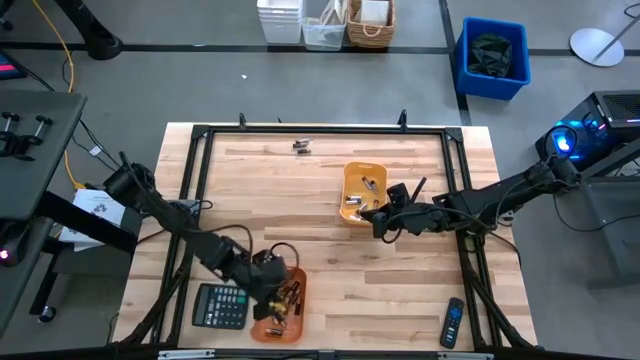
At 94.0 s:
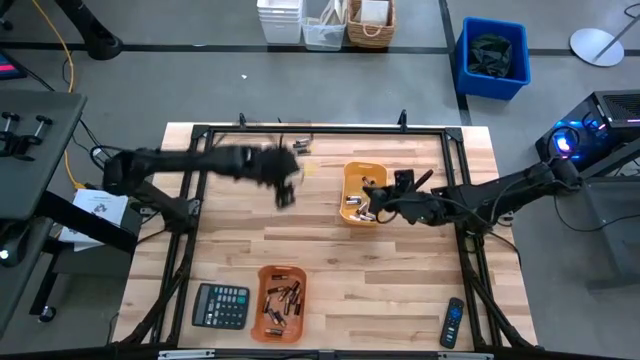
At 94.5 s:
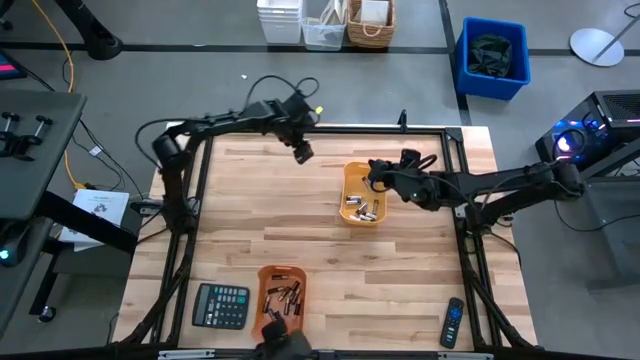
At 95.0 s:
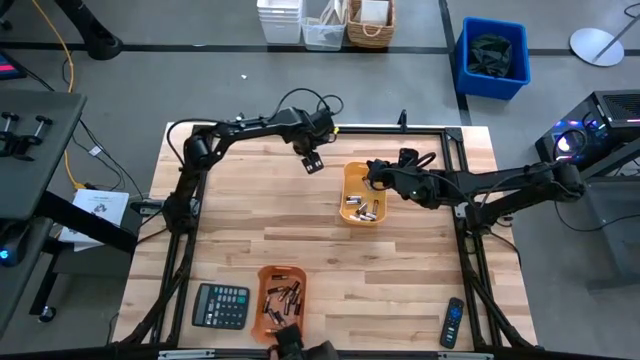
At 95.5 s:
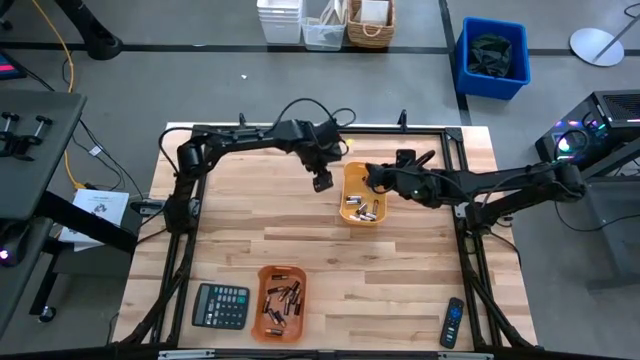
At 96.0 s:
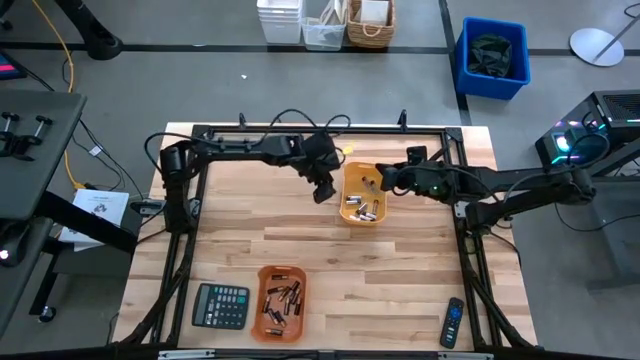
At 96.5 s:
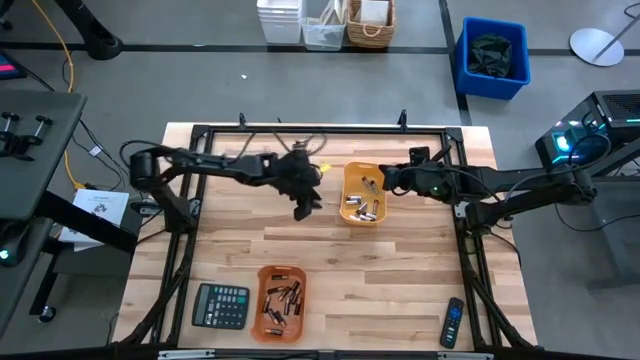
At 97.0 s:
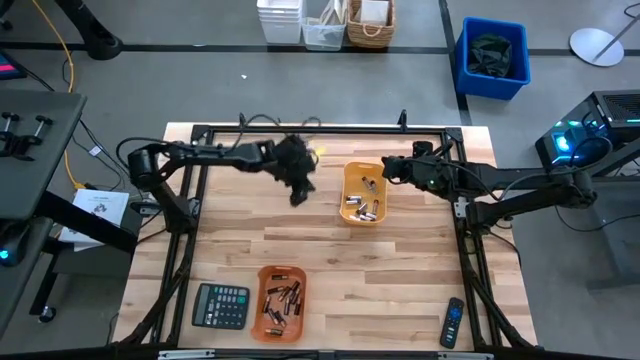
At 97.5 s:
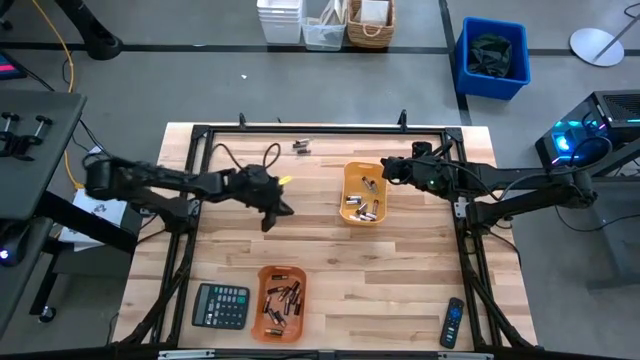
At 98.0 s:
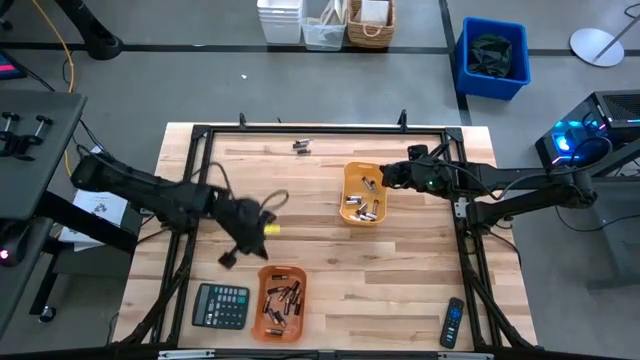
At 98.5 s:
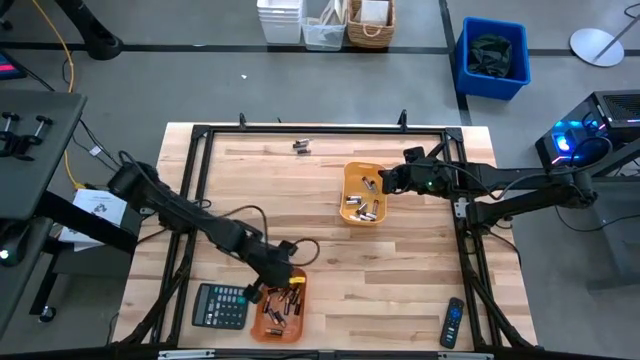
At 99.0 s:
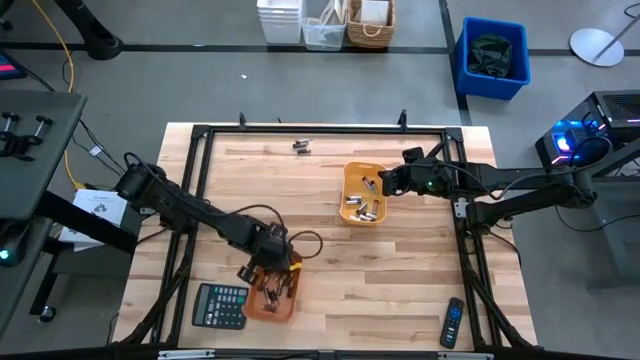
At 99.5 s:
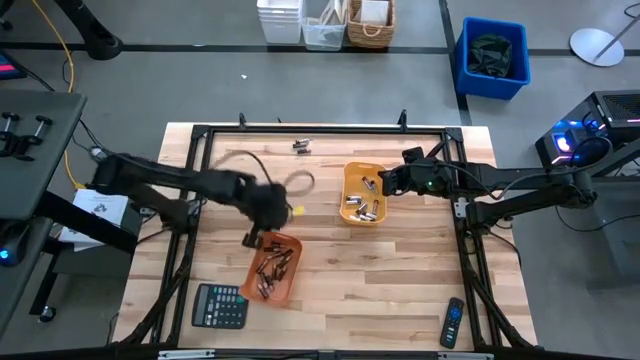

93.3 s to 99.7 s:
Task: Sort batteries
Adjust the orange bin

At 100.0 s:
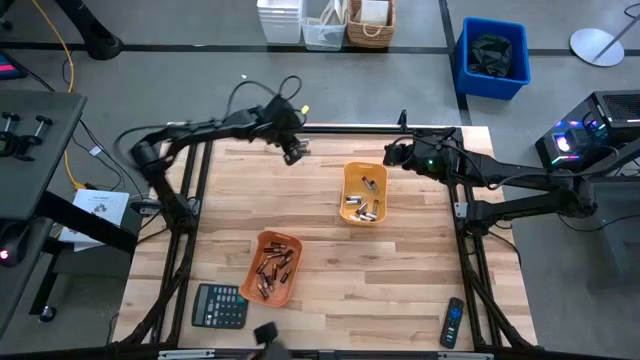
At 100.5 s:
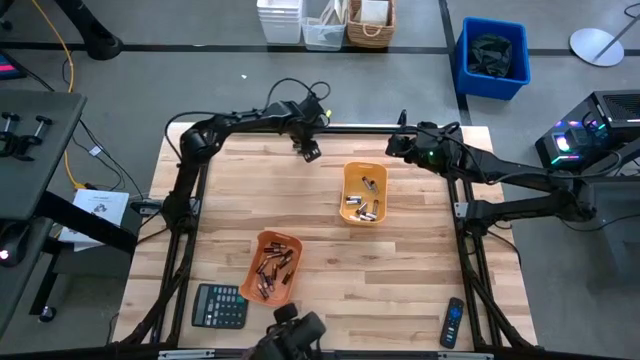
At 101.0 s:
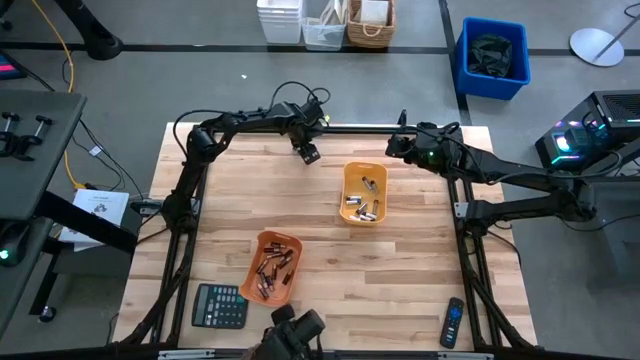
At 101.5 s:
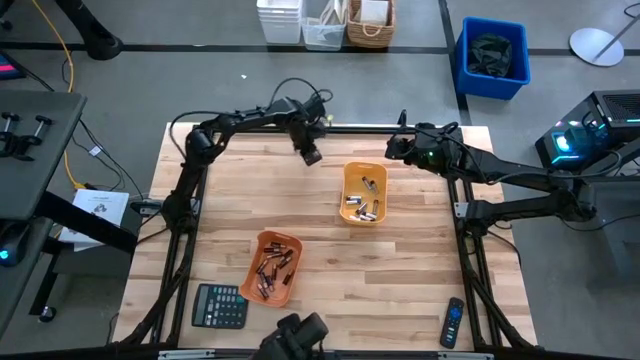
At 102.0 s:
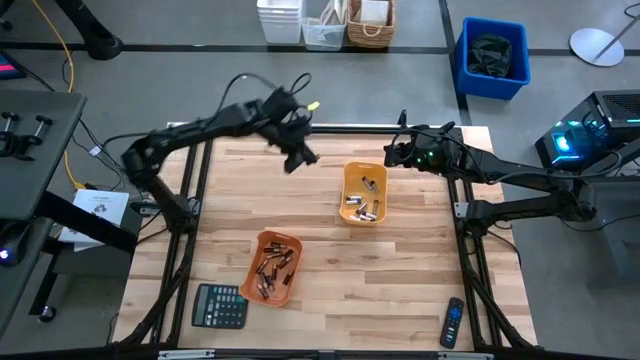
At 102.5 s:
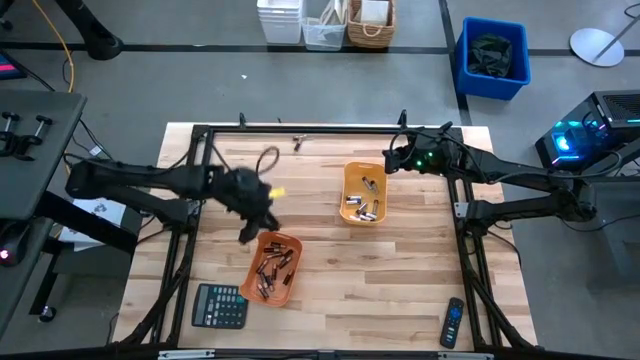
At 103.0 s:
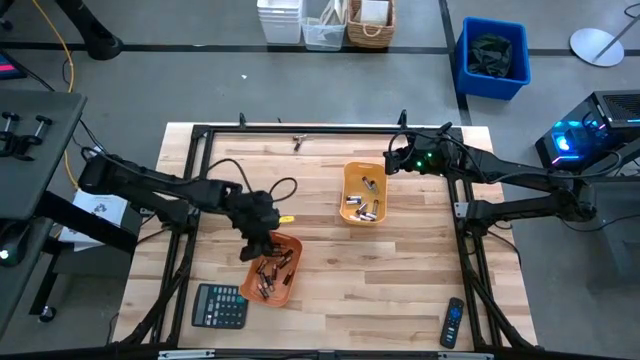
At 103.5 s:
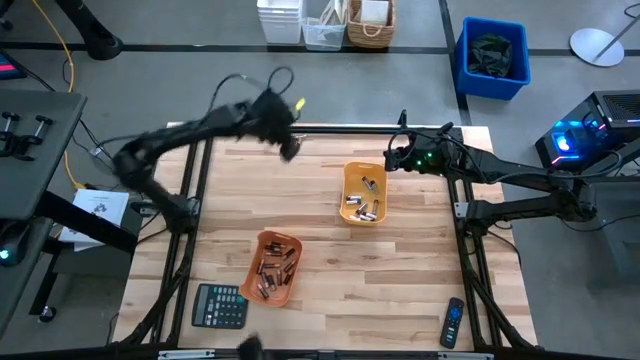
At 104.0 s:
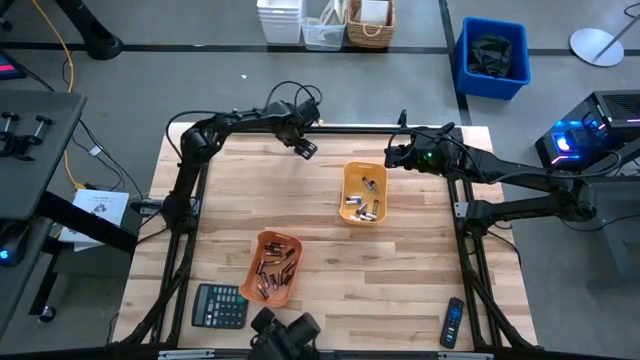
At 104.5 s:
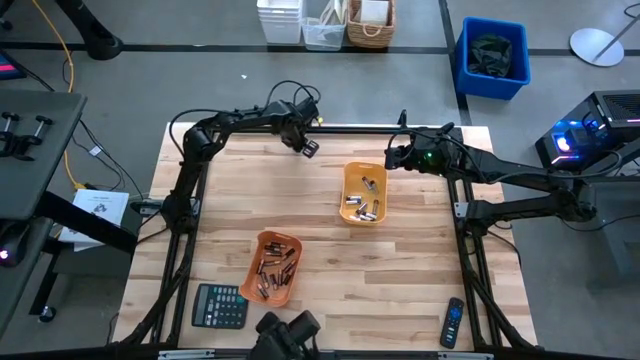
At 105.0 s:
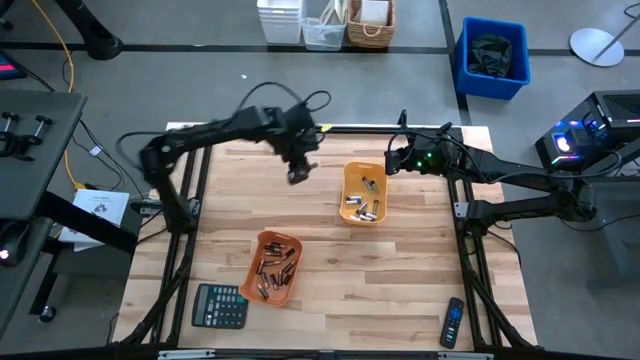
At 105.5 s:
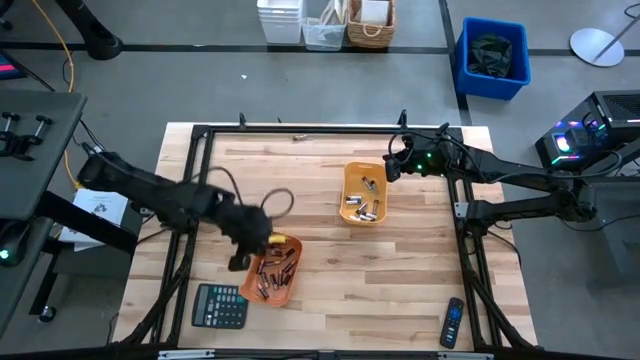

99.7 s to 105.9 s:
Put the black battery into the orange bin

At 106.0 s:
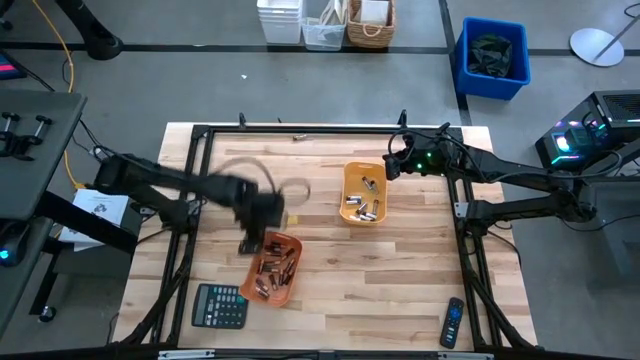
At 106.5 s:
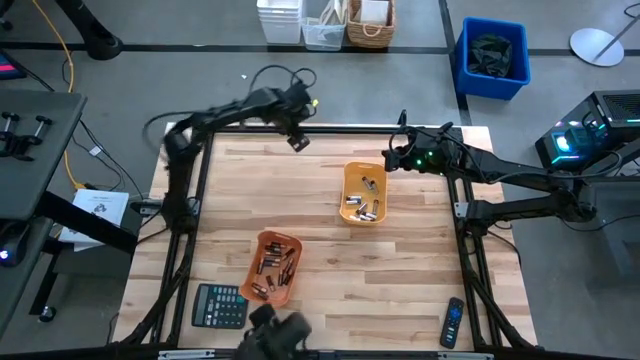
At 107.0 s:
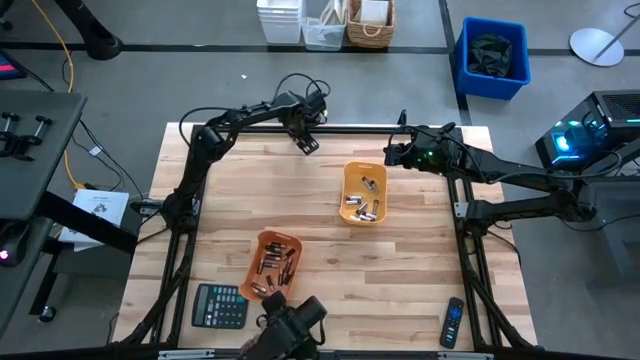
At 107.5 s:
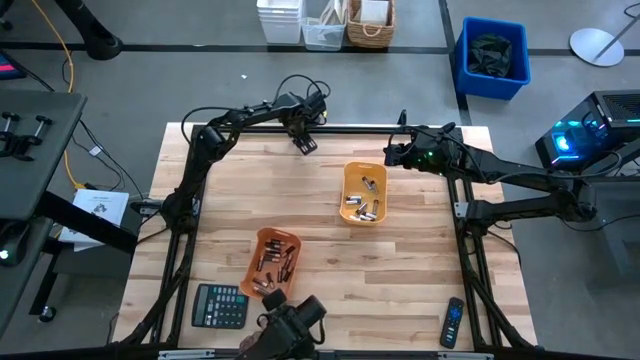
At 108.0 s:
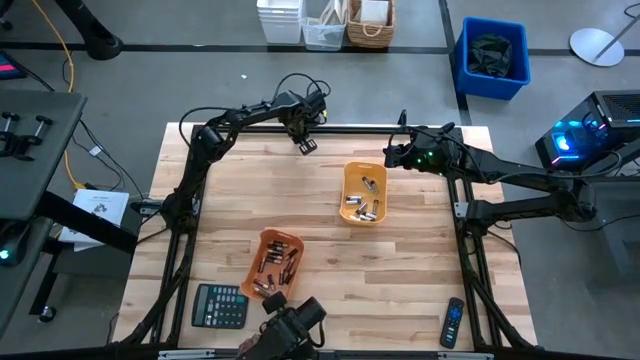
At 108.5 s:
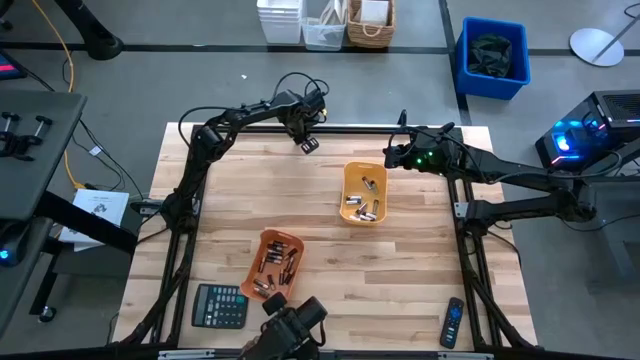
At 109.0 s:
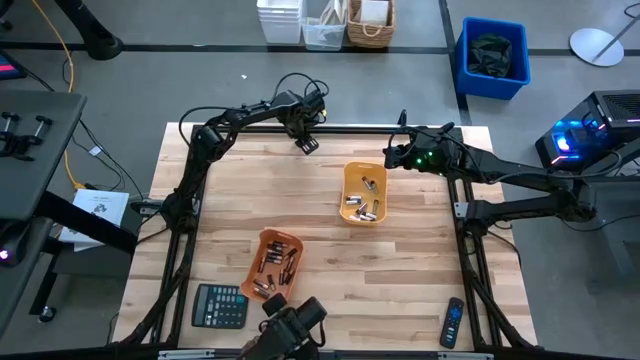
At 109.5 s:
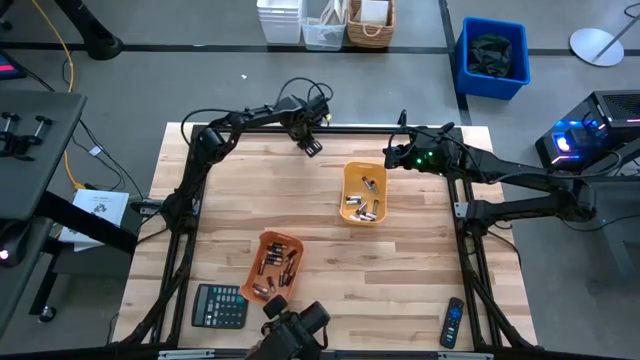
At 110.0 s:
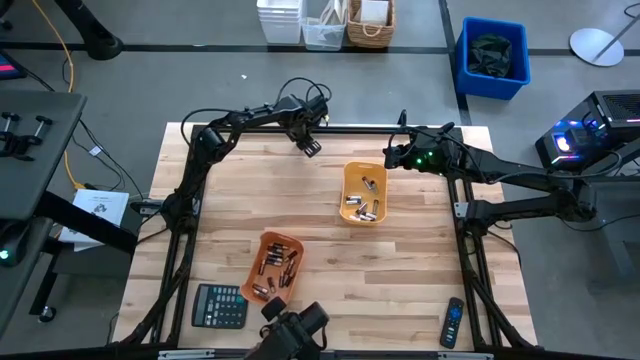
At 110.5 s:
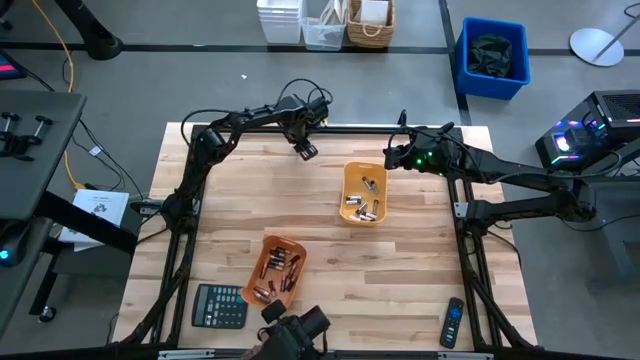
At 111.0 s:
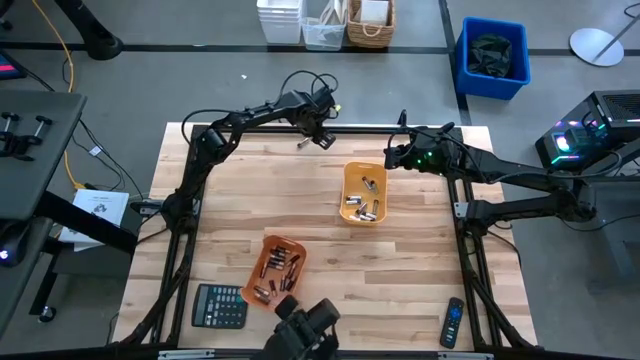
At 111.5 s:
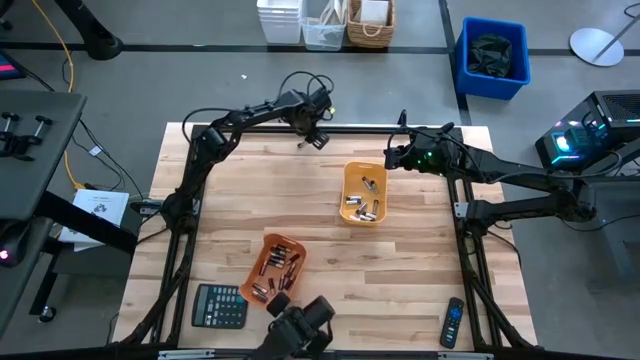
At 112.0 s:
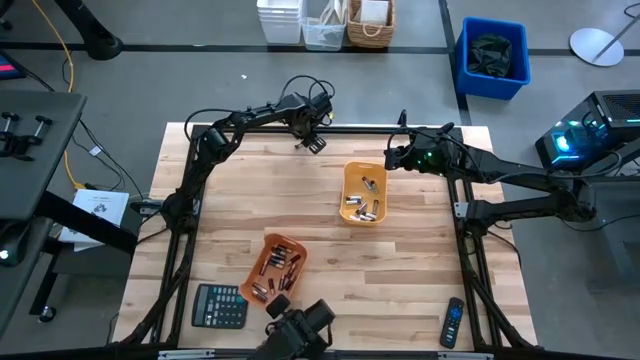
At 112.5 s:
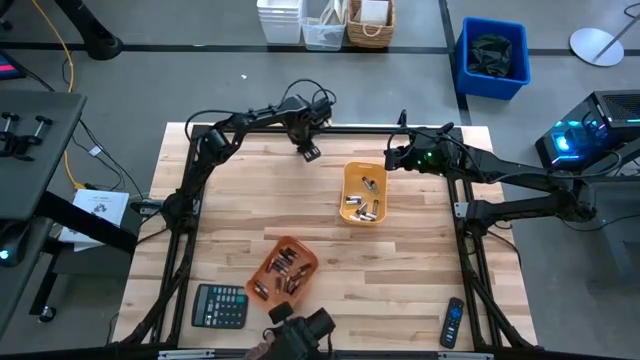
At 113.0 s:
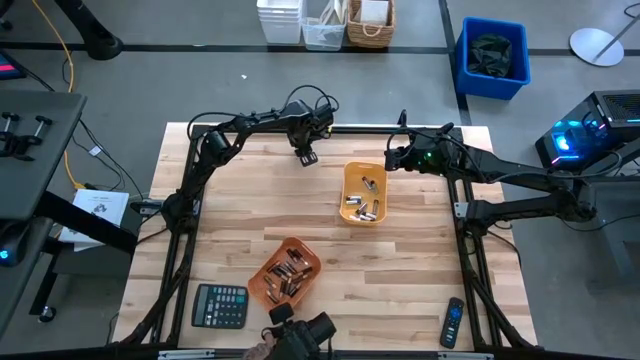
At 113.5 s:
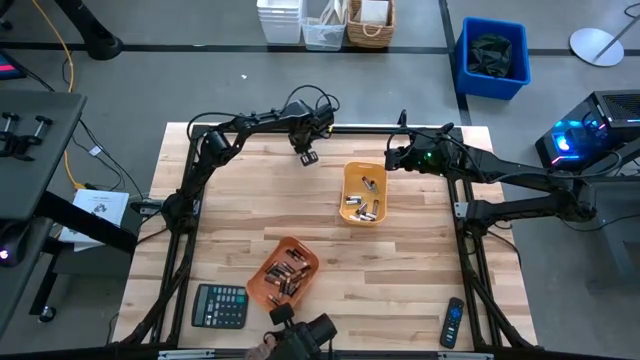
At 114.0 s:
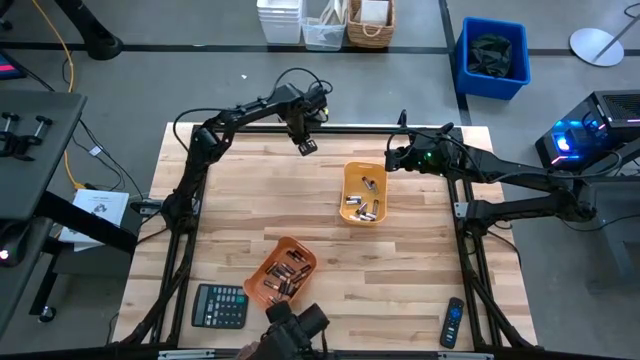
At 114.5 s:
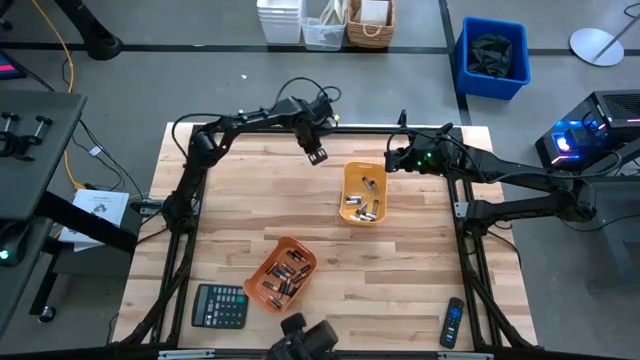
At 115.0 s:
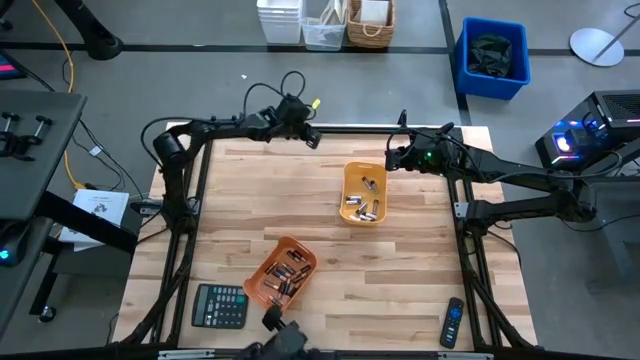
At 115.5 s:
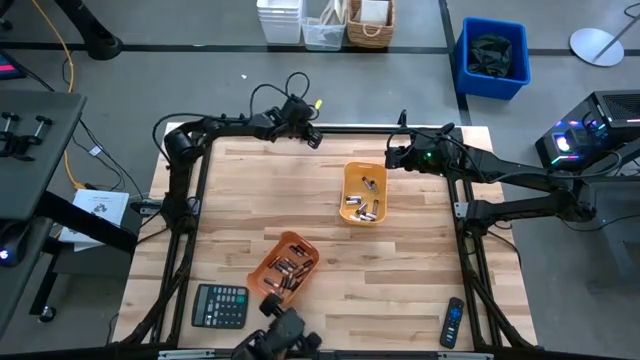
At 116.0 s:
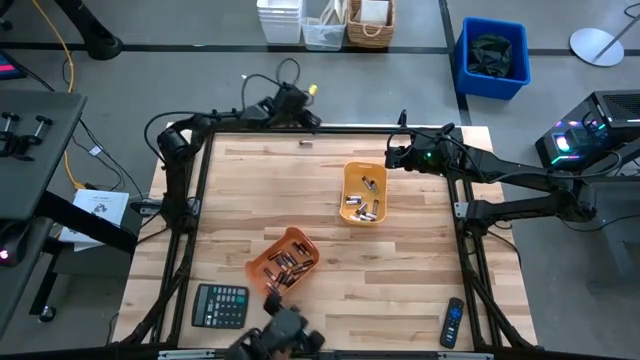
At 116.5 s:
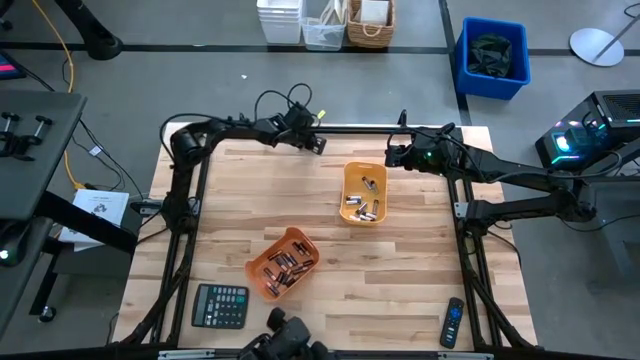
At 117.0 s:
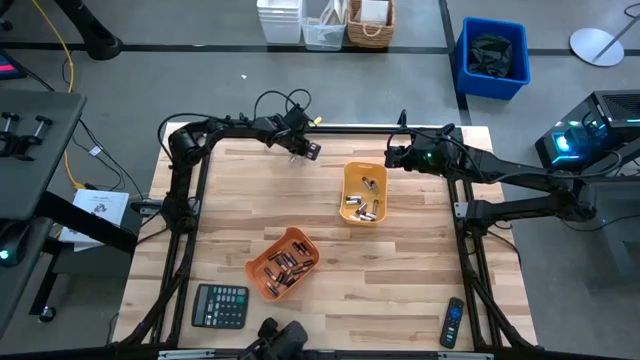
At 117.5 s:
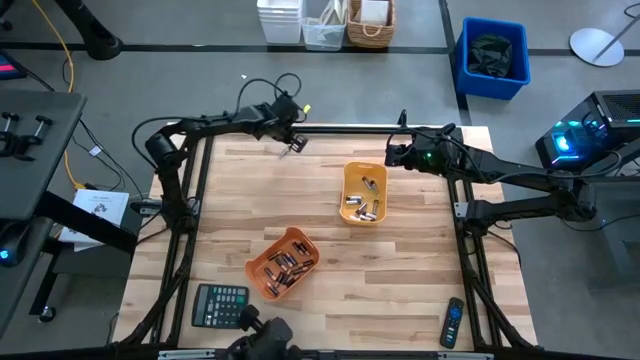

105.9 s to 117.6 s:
Put the silver battery into the yellow bin
